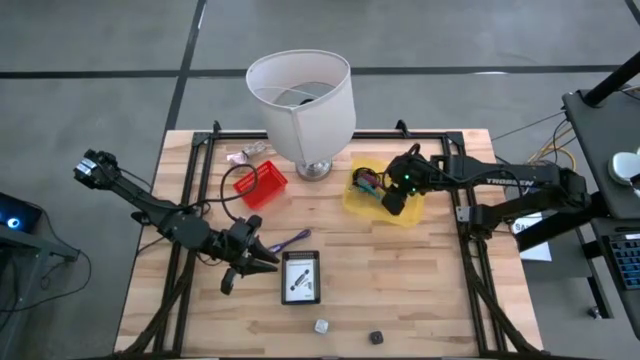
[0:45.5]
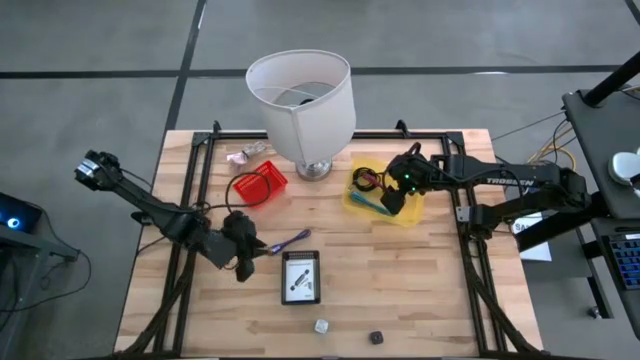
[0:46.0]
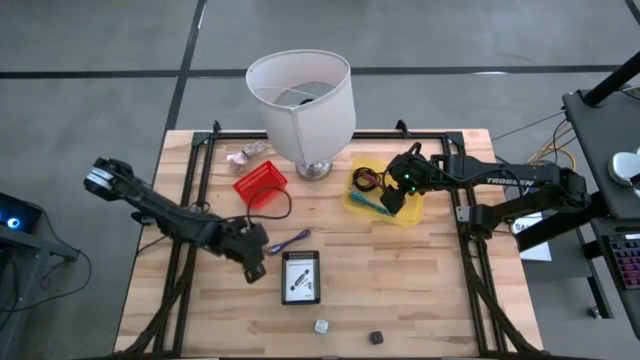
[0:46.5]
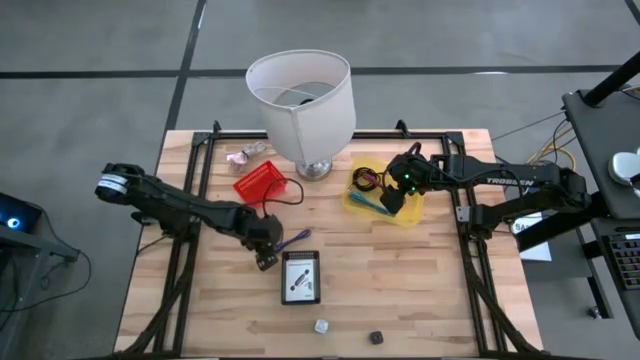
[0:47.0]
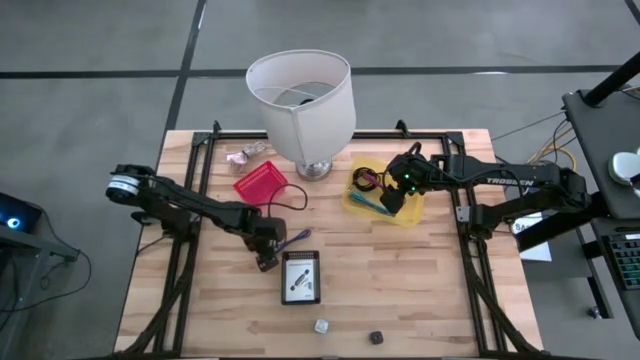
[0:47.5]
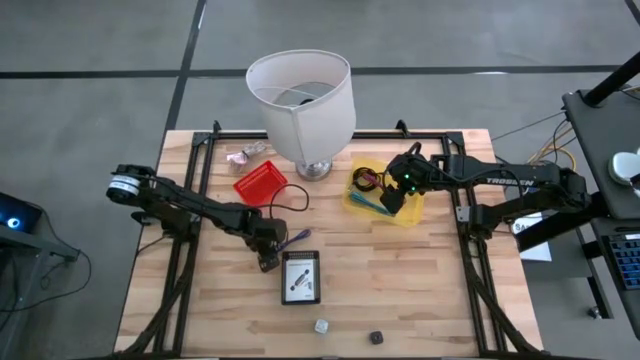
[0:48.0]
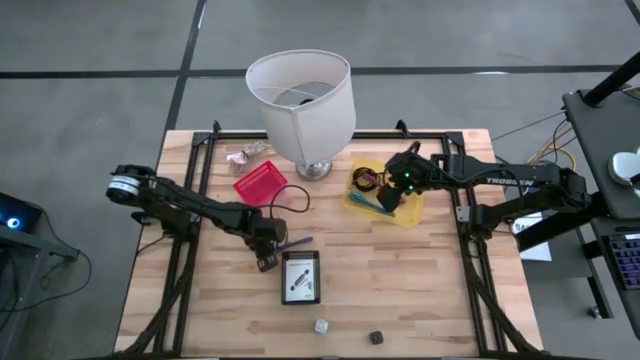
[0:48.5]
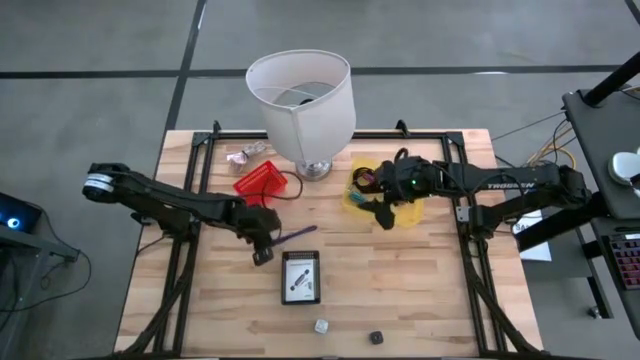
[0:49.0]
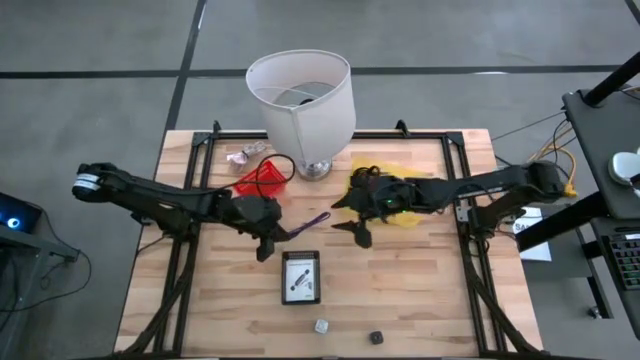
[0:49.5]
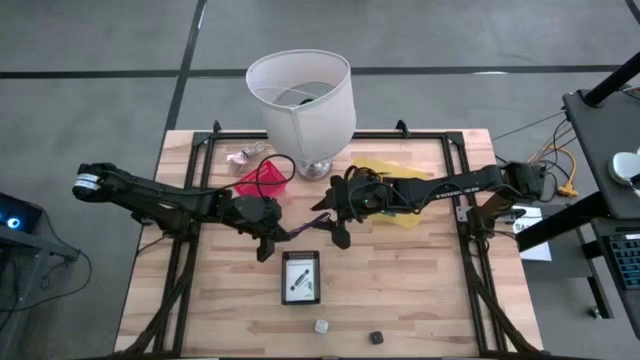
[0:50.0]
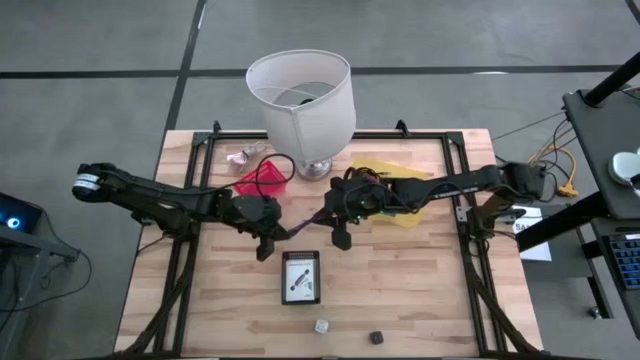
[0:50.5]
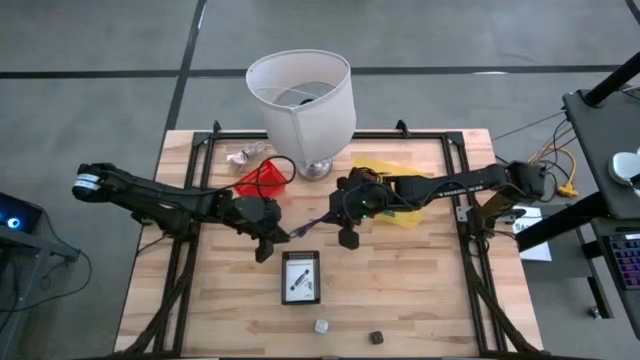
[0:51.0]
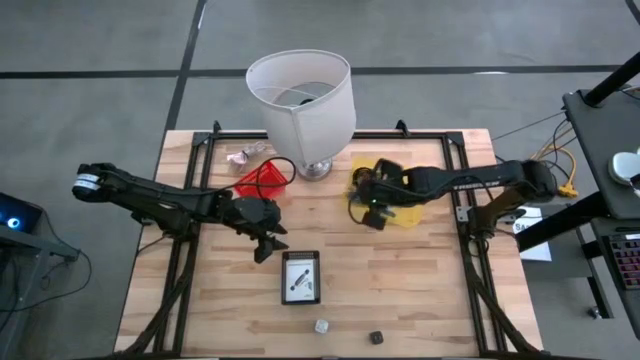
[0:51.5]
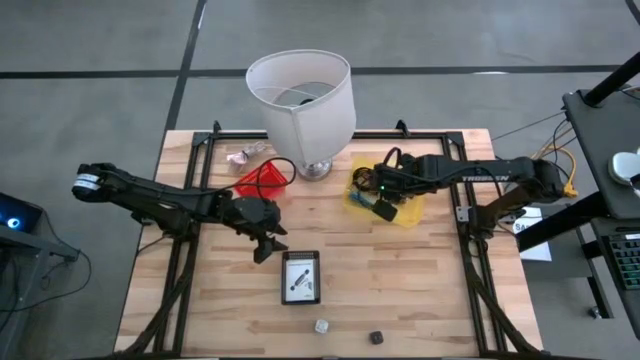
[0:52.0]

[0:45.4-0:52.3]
Task: Pick and place items into bin
Put the violet charger cable into the yellow bin

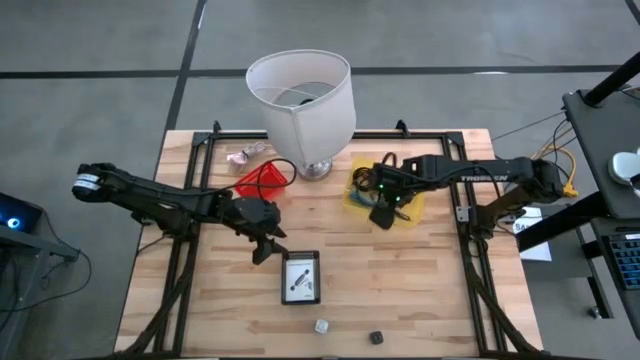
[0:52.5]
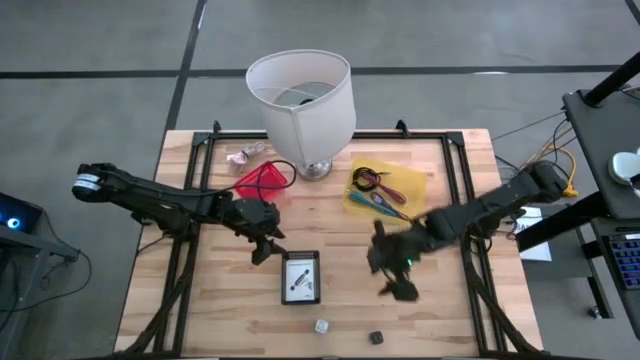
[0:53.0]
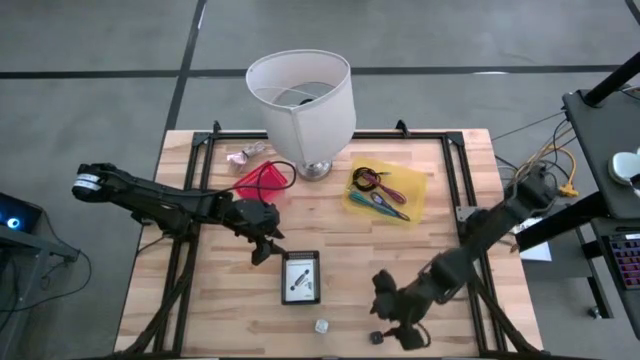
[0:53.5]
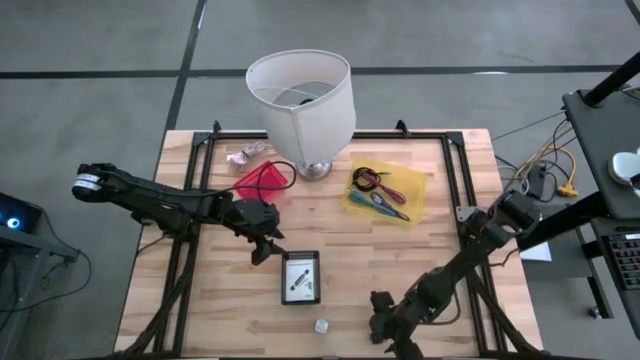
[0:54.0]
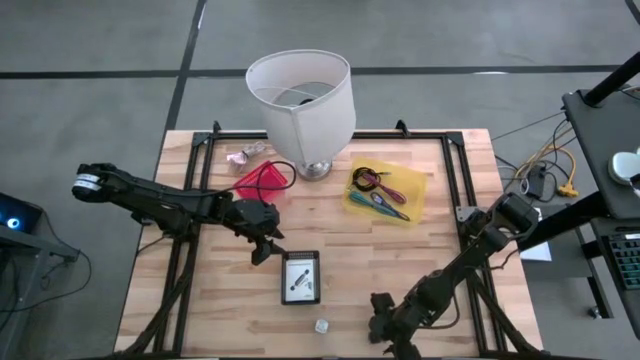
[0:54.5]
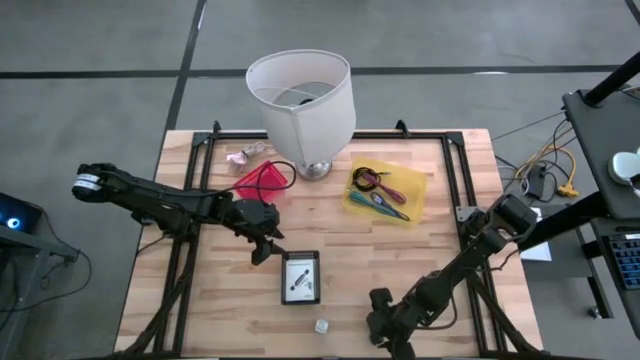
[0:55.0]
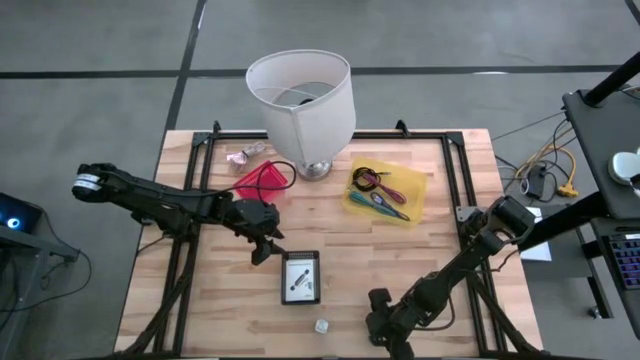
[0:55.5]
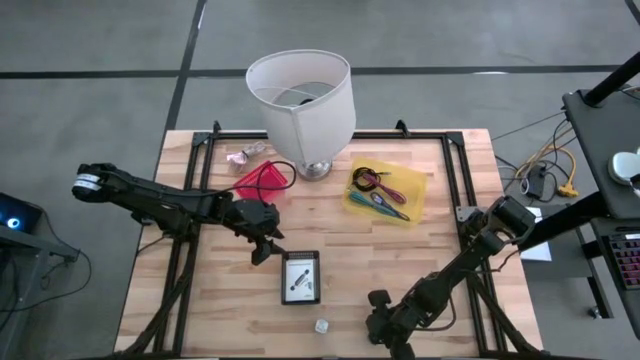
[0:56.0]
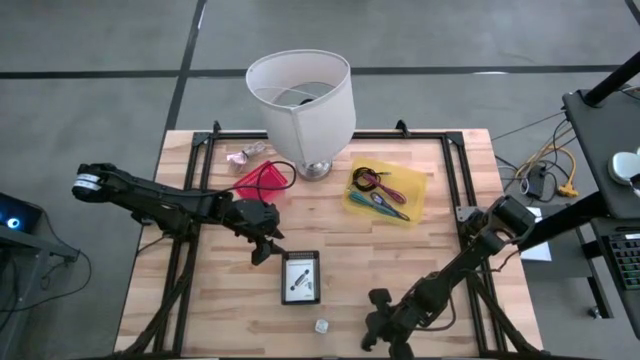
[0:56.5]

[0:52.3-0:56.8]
Put the black charger adapter into the red bin

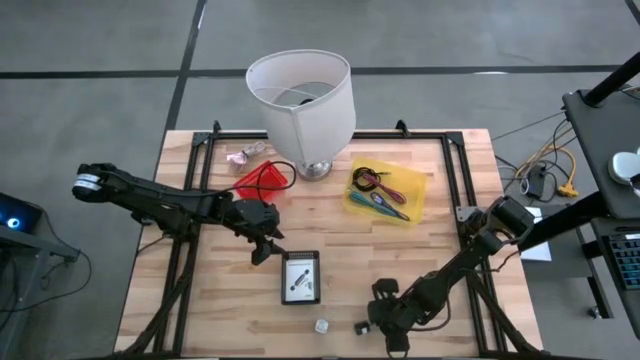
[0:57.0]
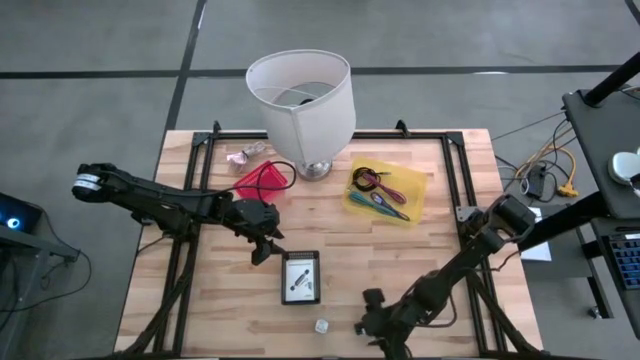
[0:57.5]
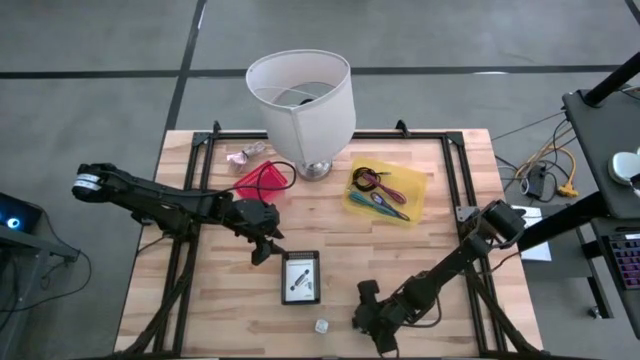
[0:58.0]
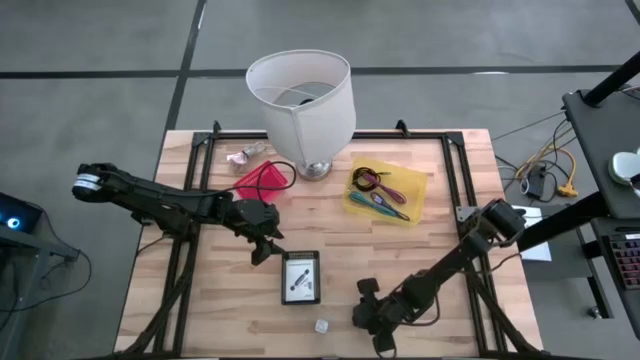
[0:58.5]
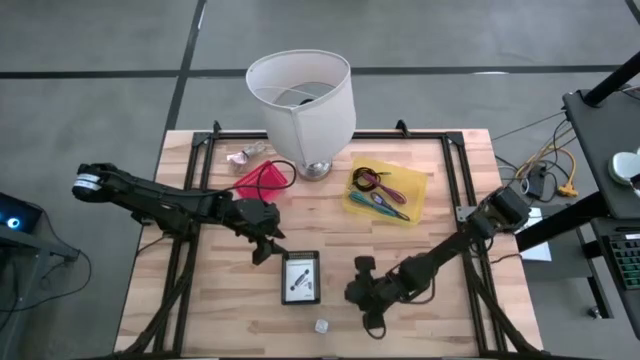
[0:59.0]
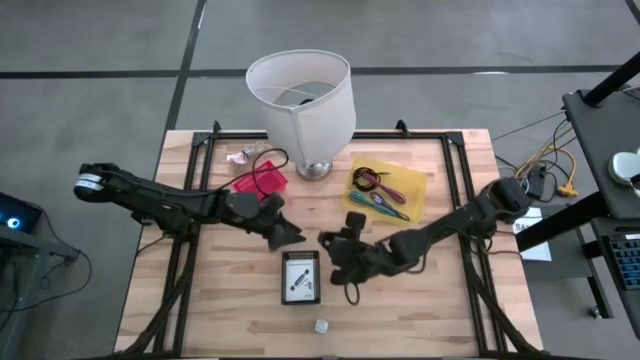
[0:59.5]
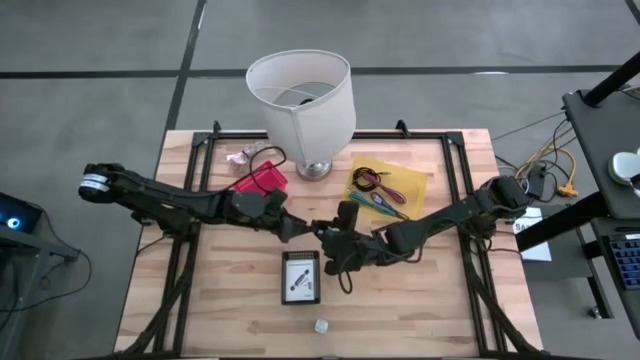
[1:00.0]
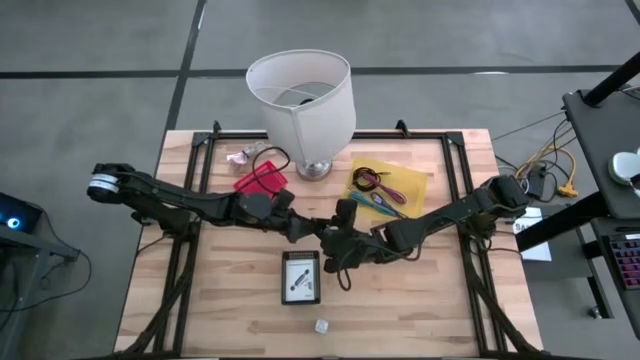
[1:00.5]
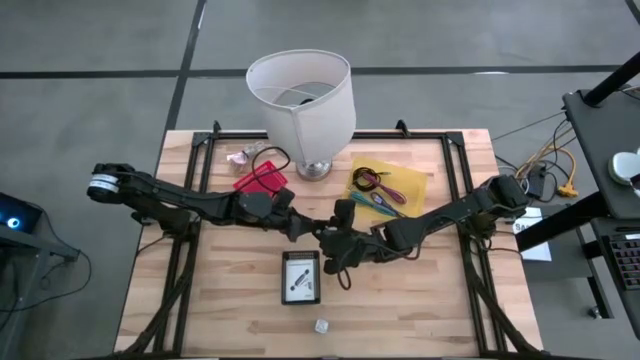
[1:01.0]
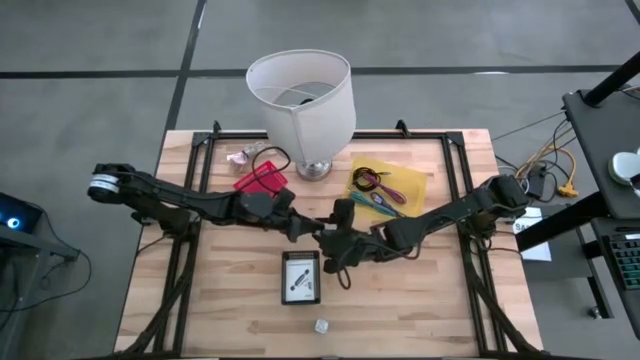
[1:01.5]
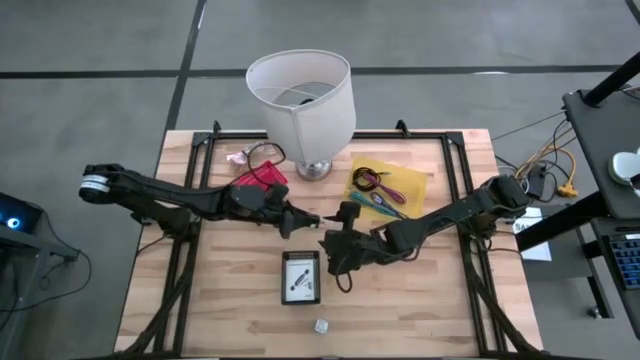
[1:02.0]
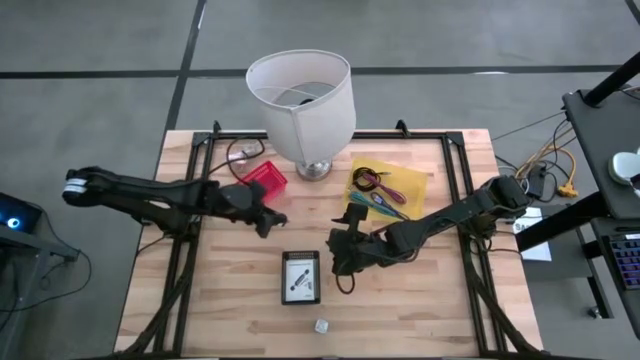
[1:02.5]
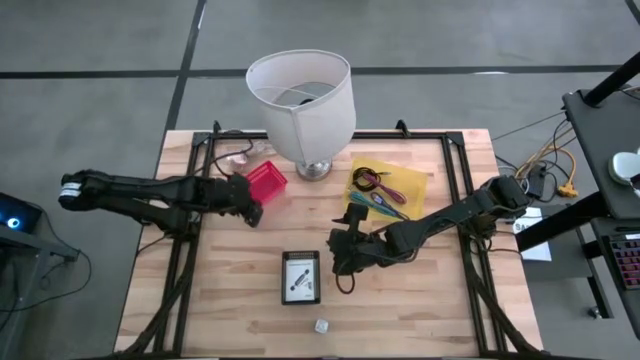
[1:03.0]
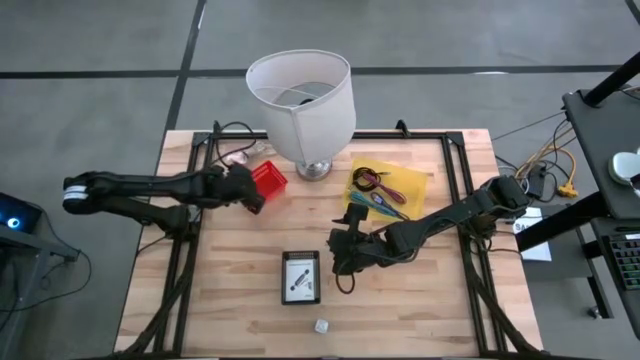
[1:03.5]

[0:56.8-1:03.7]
Put the black charger adapter into the red bin

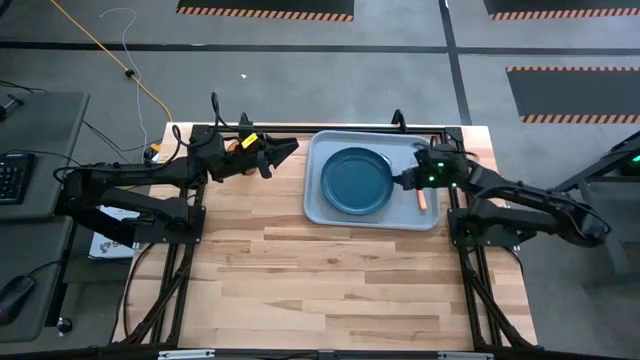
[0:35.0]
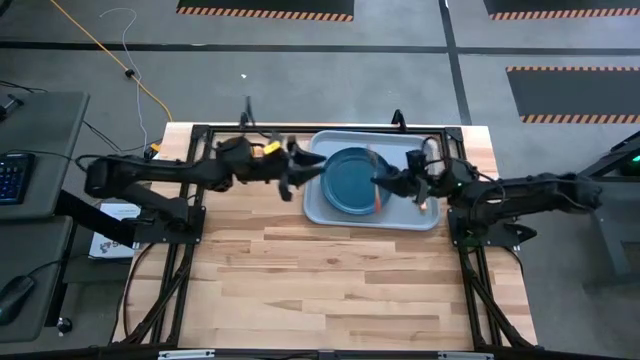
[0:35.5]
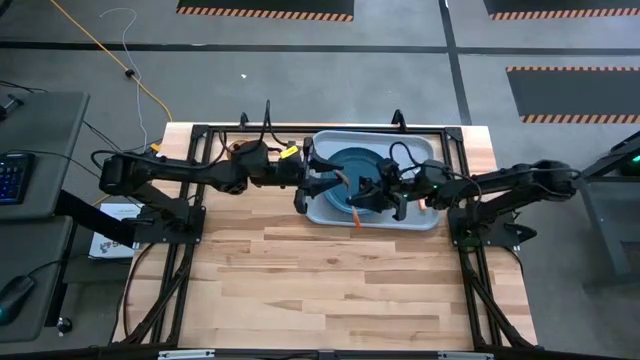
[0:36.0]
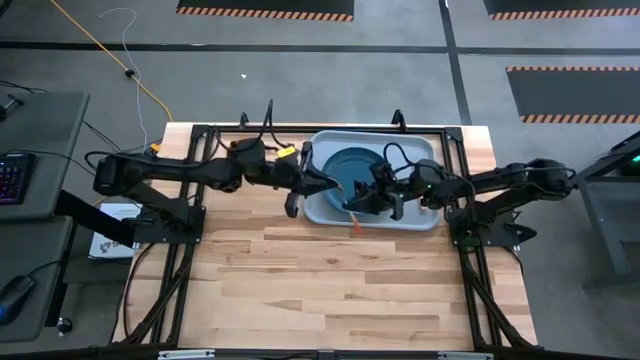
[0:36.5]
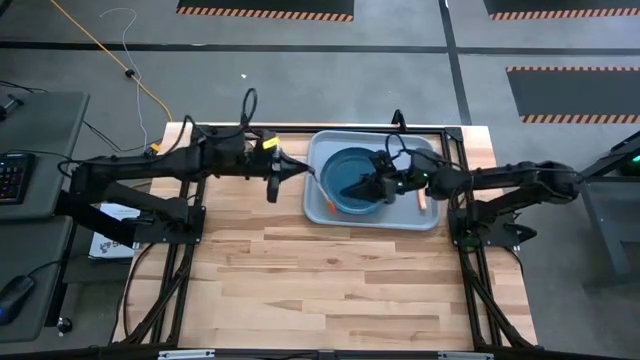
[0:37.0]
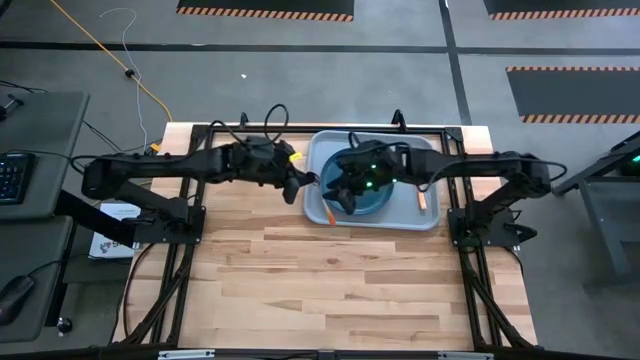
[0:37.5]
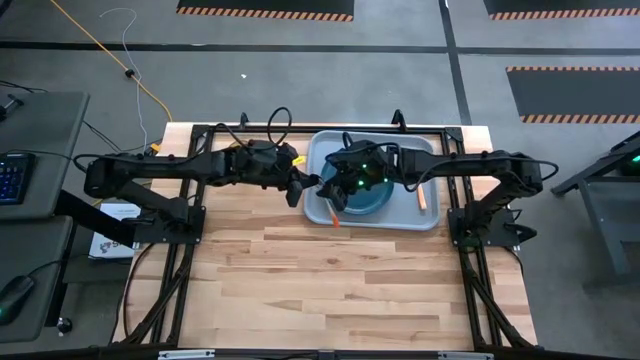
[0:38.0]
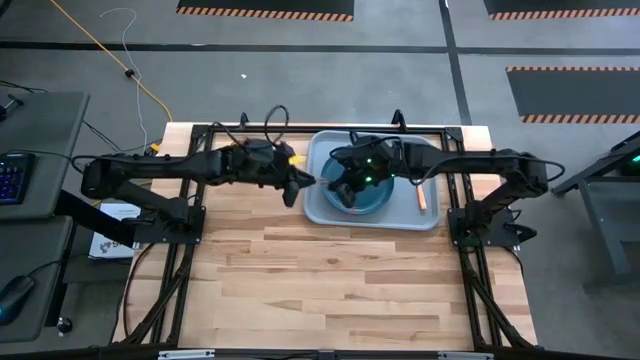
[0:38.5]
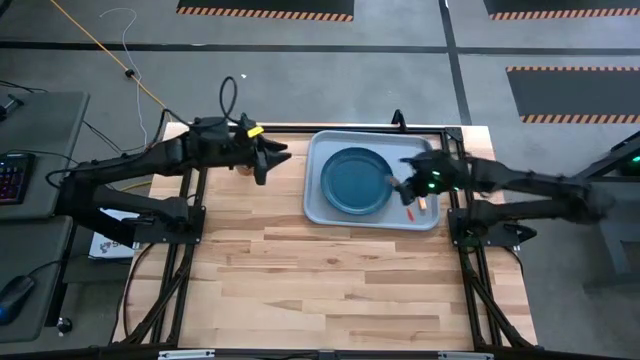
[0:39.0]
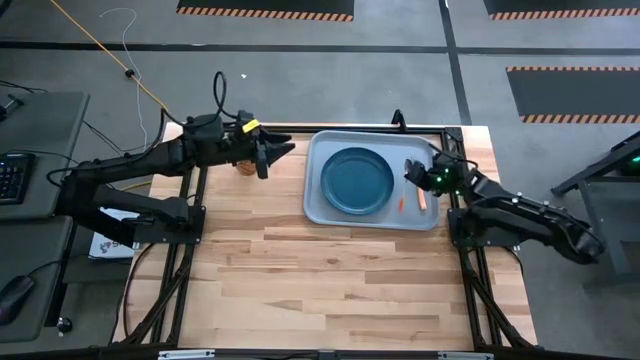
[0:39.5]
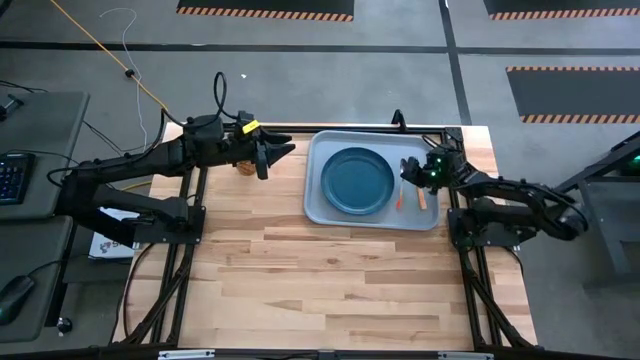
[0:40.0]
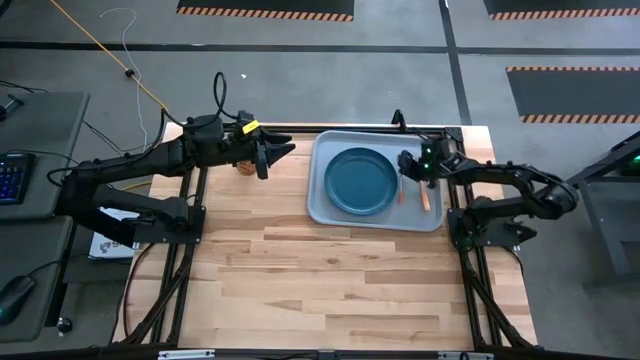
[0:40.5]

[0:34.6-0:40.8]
Task: Pick and place plate/cup/fork/spoon on tray
Put the orange spoon on the blue tray to the right of the blue plate
